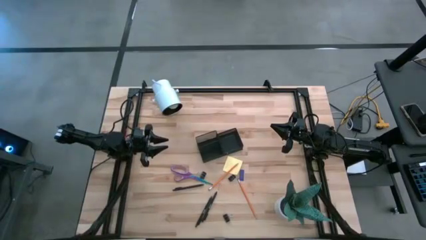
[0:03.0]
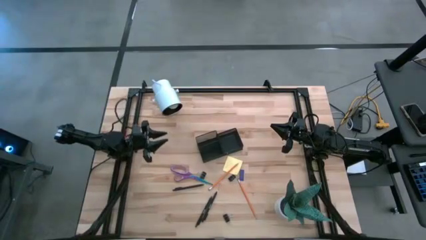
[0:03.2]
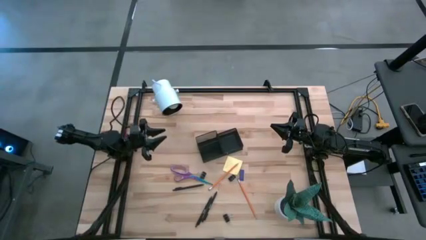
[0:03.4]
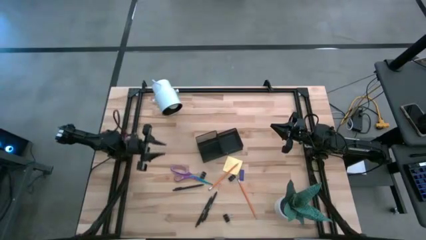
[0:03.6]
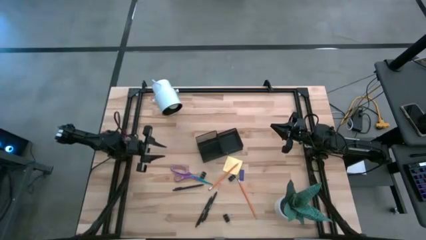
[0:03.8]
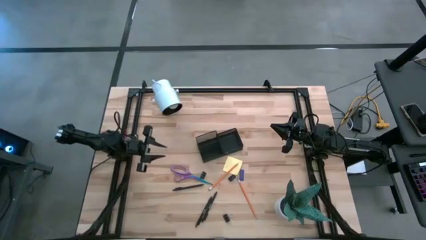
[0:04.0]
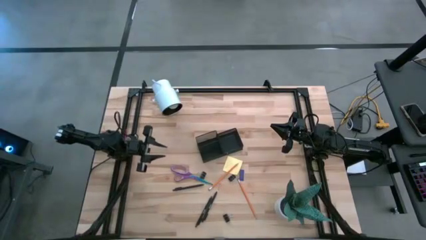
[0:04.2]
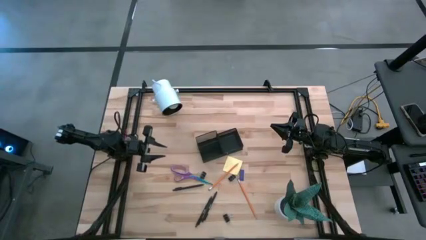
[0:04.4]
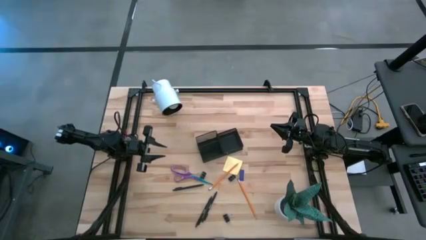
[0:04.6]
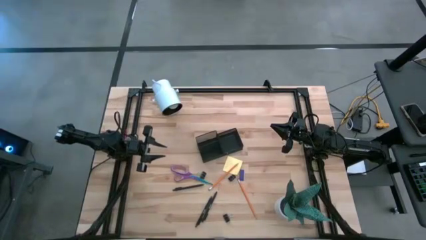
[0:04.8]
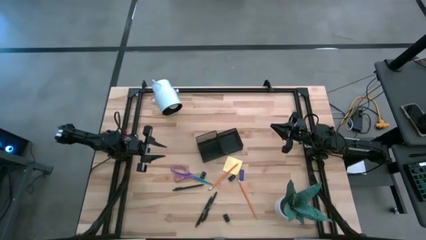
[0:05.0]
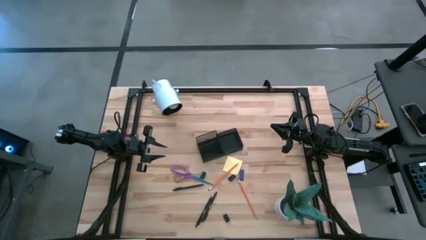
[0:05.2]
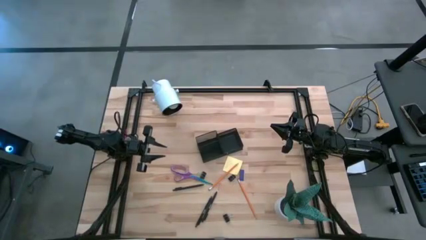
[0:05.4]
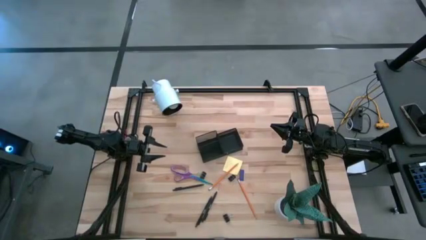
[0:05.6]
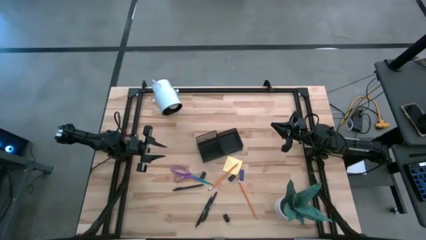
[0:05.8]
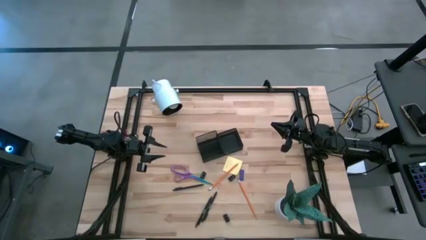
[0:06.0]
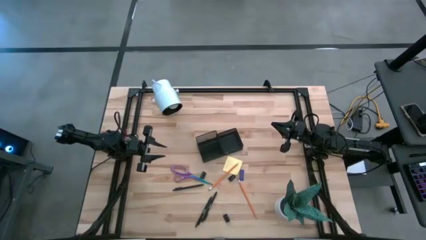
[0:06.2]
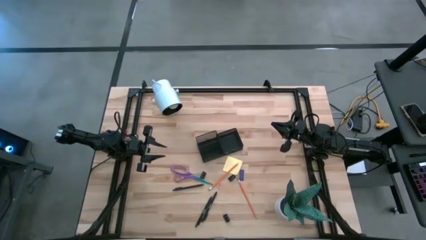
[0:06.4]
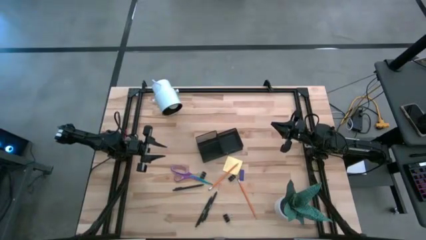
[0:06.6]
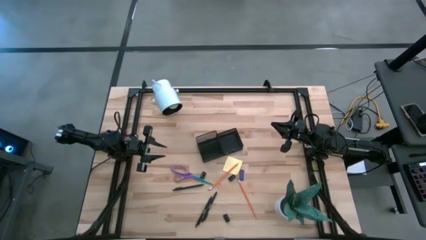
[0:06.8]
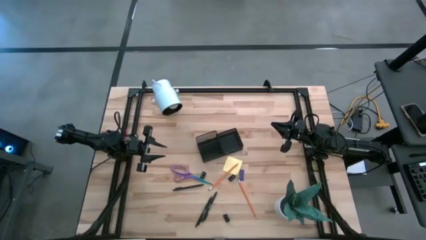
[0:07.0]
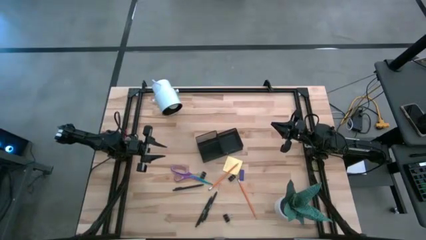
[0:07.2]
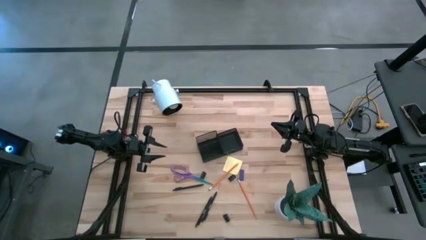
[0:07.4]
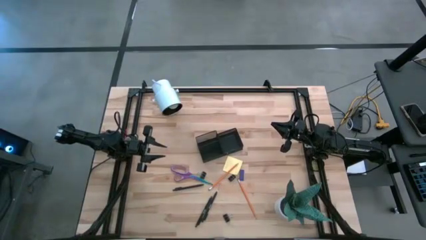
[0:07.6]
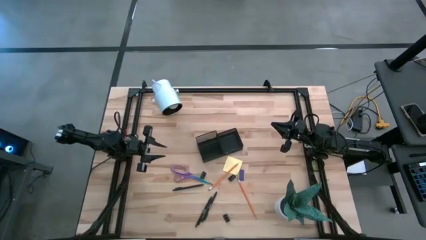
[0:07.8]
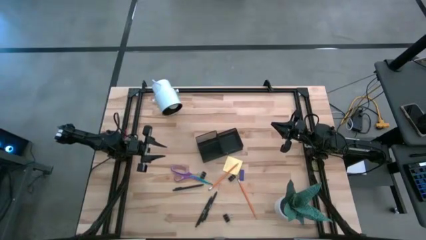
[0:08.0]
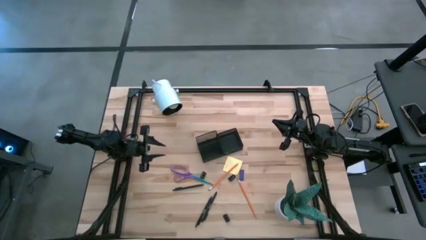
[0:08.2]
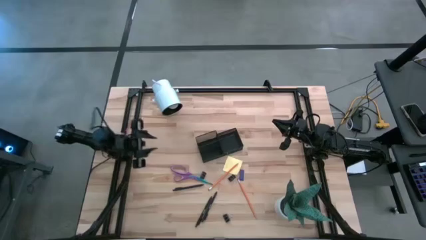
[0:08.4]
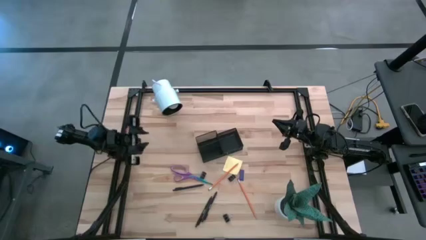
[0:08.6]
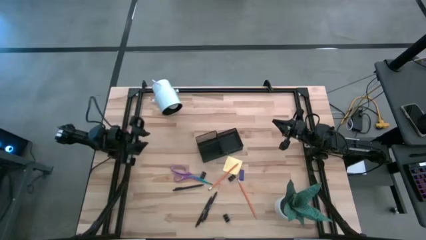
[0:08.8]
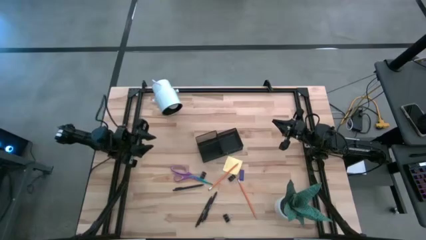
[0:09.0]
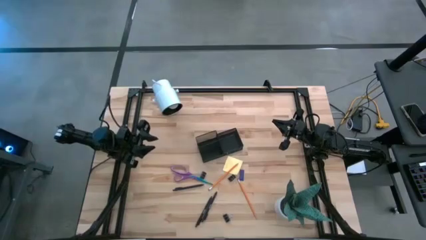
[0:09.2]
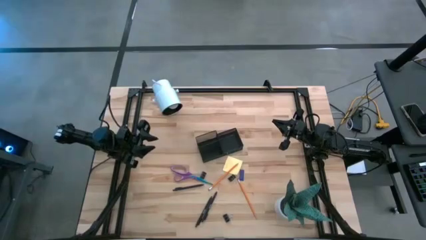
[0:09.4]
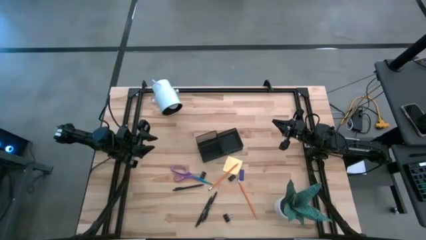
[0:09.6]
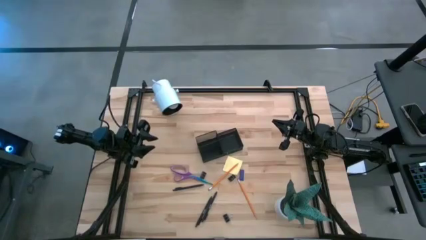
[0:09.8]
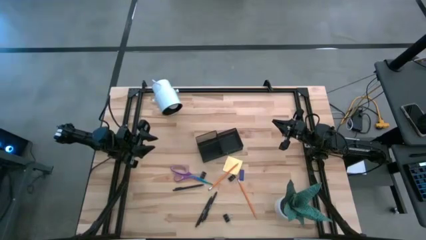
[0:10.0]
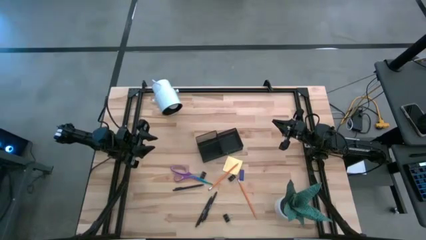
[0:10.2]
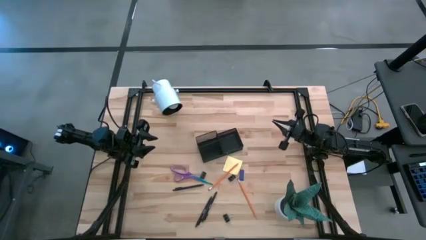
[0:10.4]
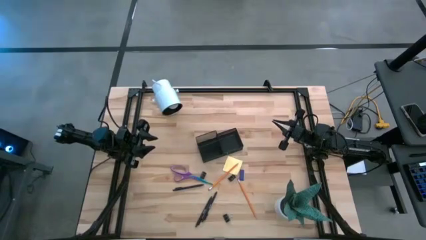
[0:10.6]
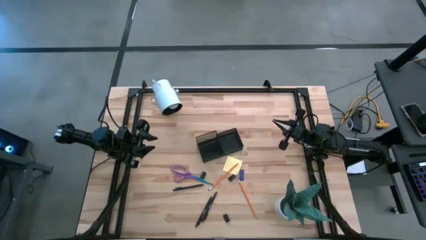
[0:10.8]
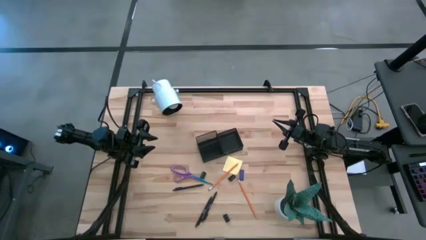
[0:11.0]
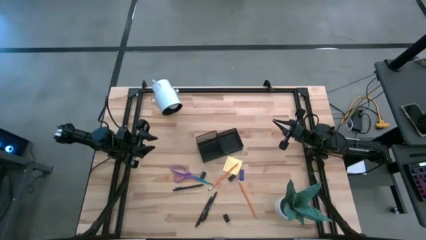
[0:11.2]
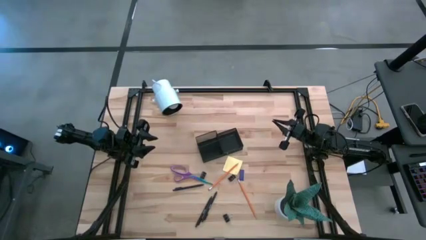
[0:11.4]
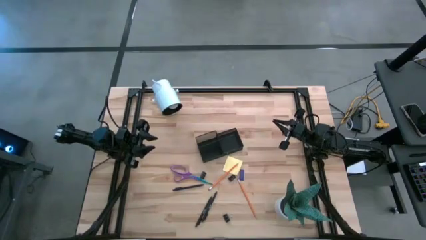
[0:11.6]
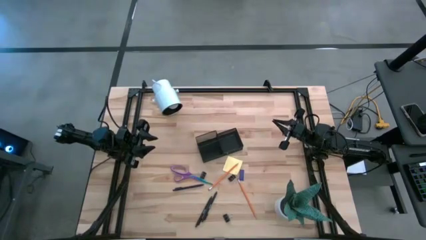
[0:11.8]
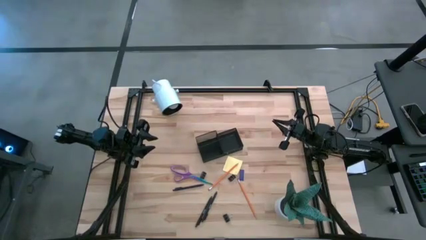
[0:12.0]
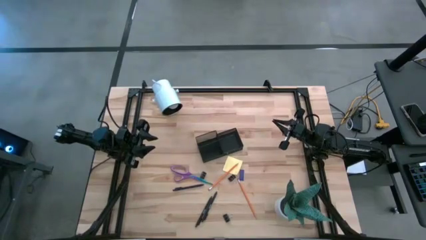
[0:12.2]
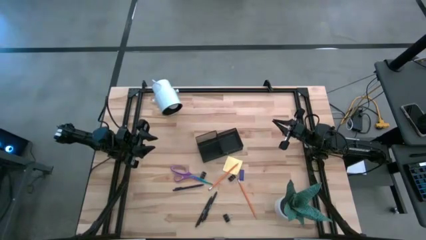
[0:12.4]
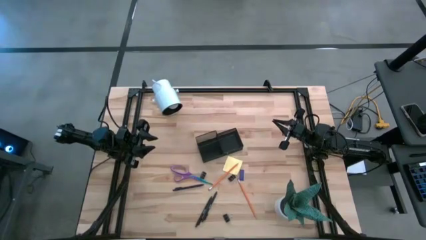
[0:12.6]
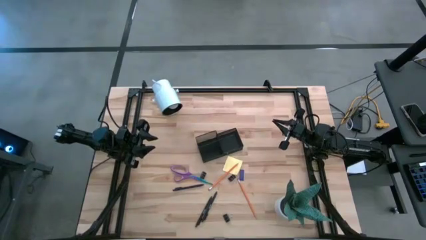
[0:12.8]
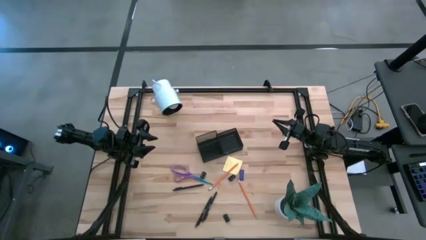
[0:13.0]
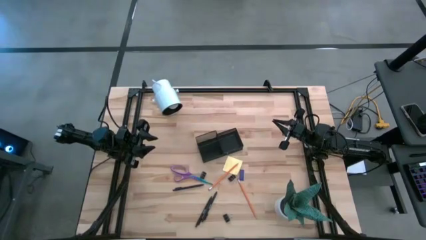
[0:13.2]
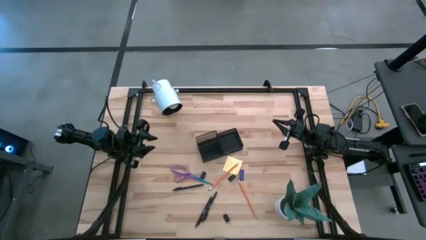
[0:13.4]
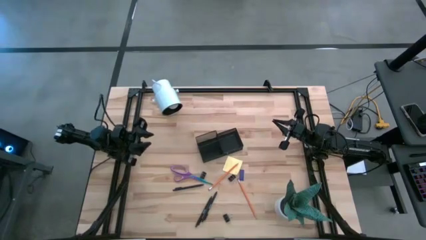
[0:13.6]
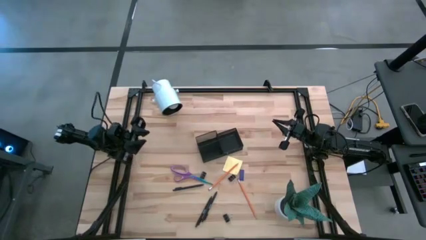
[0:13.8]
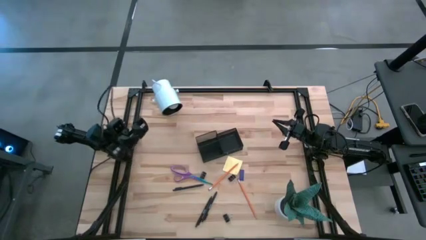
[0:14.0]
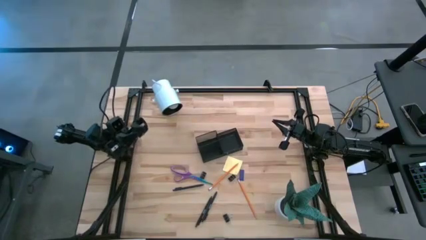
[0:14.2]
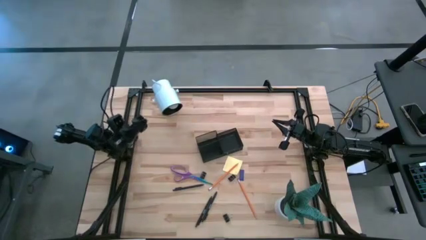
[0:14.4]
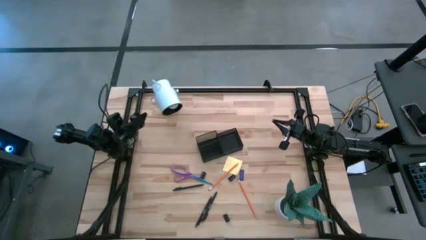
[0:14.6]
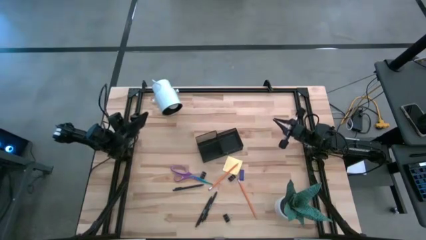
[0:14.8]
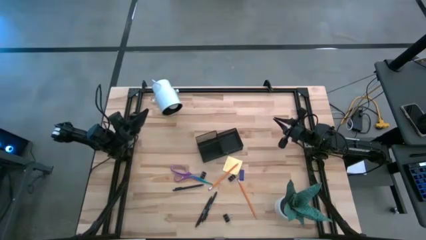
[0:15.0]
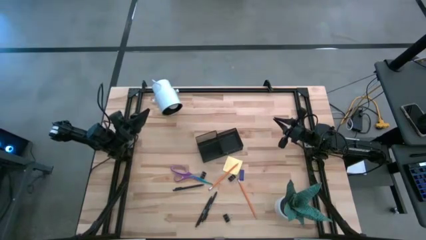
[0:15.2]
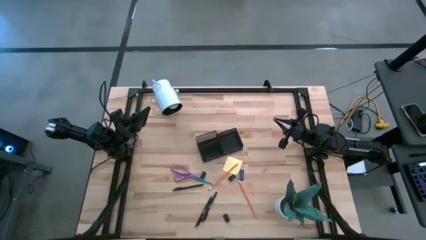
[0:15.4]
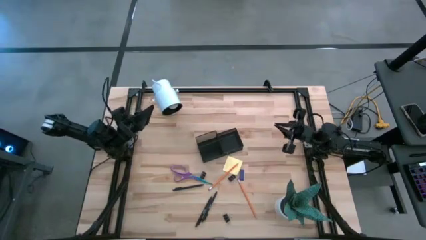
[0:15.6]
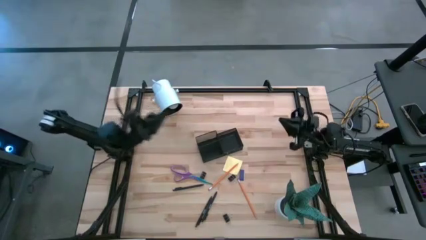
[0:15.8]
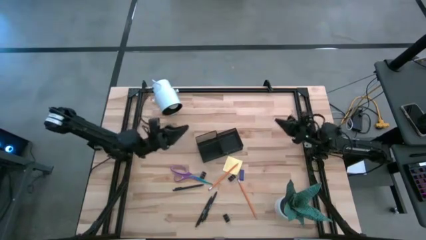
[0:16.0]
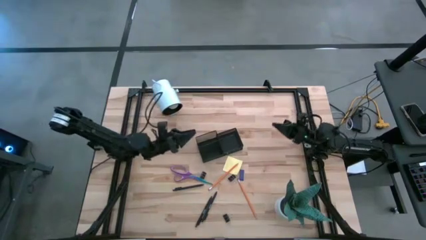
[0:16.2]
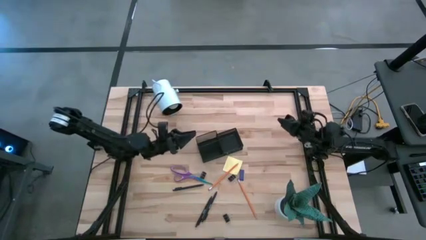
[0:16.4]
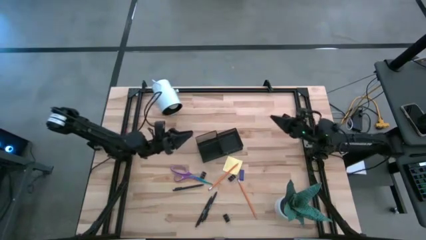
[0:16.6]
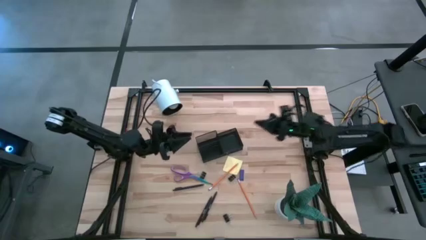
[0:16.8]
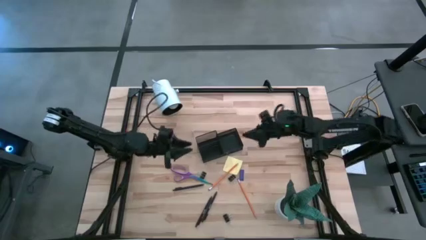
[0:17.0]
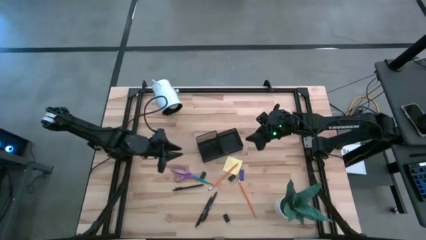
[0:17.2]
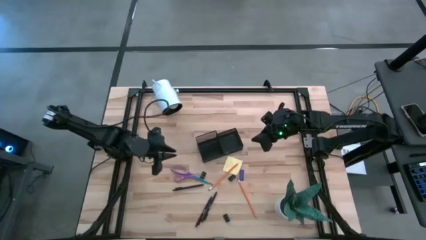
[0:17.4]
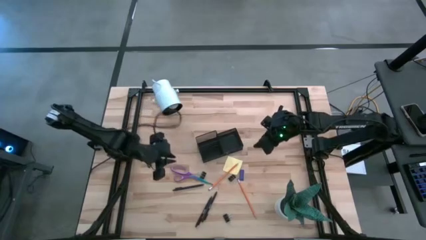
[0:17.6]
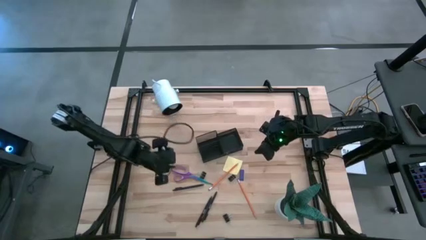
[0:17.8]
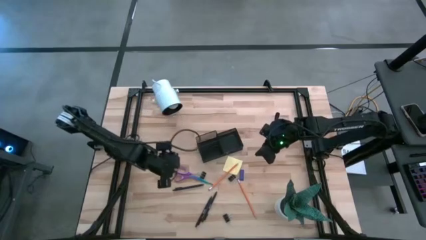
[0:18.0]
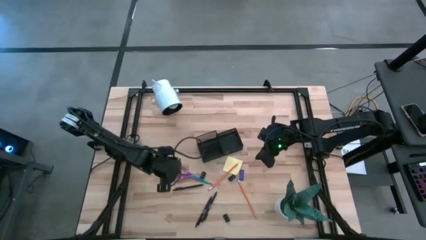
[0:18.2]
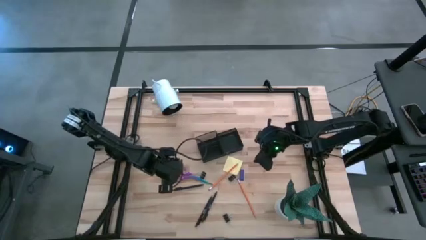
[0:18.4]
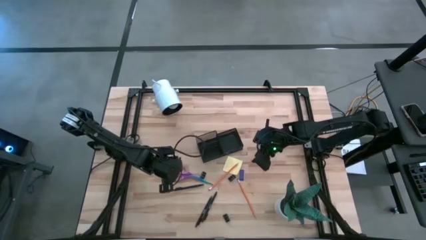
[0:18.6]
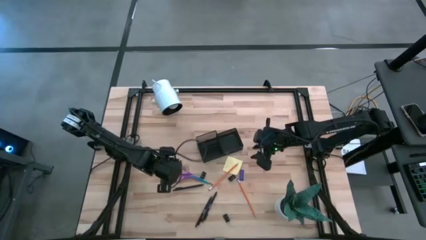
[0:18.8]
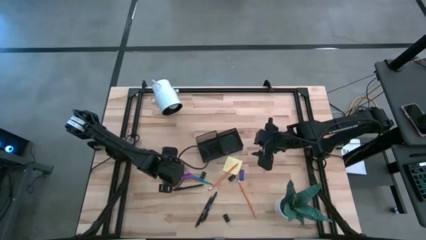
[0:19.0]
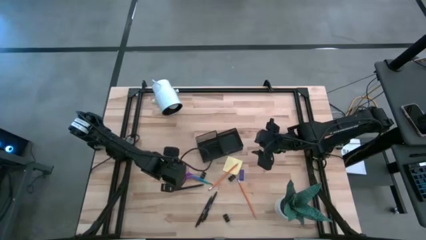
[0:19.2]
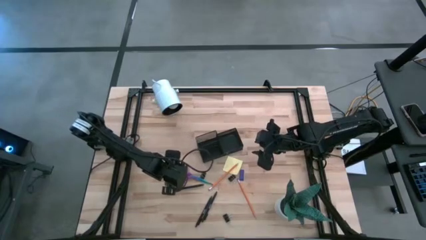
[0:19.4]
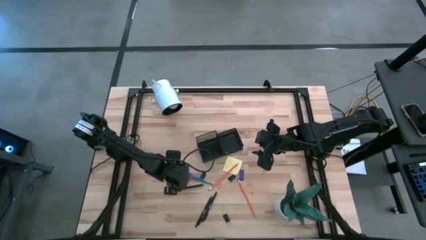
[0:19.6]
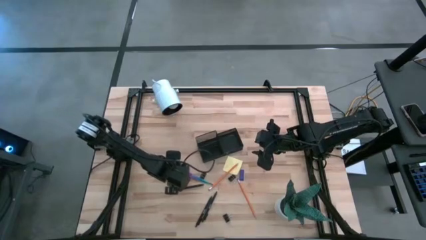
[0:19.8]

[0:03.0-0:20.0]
Task: Pick and place office supplies into organizer
Put the purple scissors into the black desk organizer
